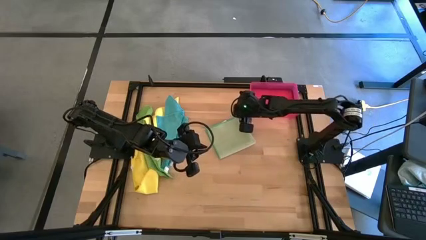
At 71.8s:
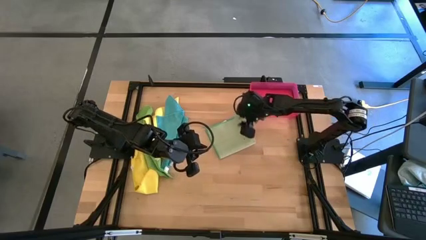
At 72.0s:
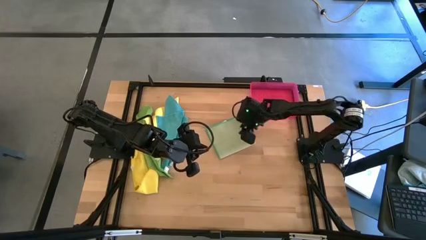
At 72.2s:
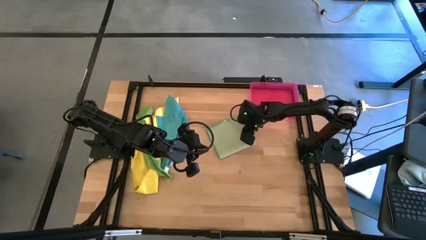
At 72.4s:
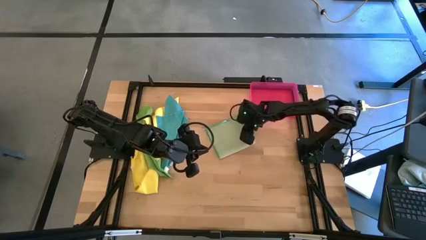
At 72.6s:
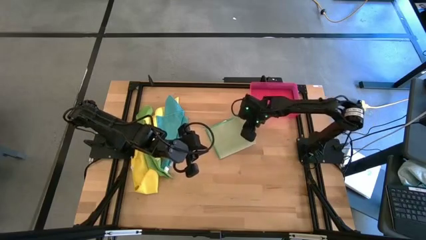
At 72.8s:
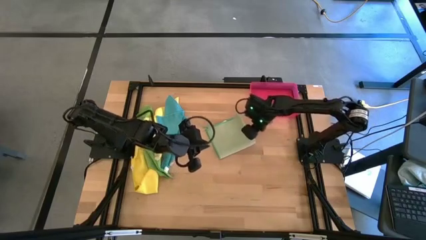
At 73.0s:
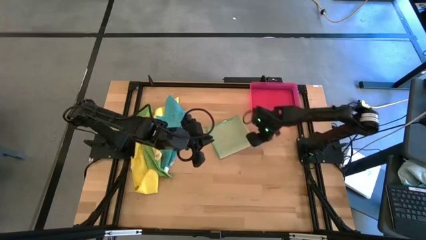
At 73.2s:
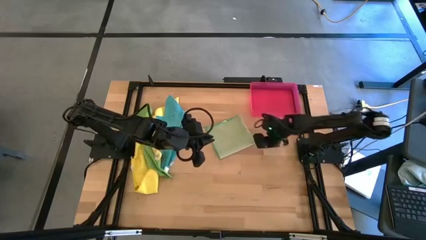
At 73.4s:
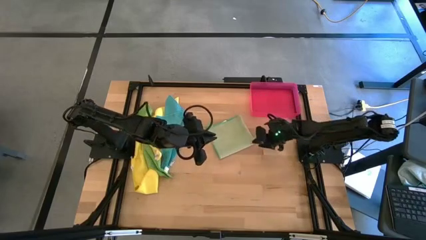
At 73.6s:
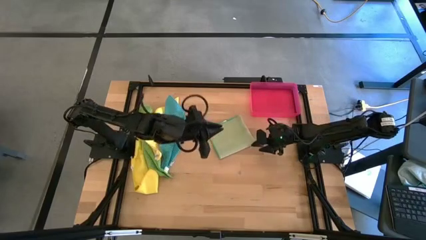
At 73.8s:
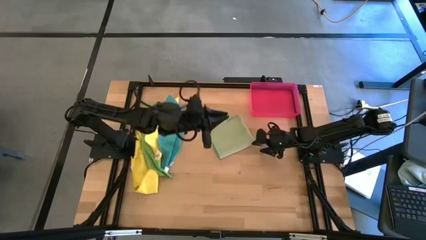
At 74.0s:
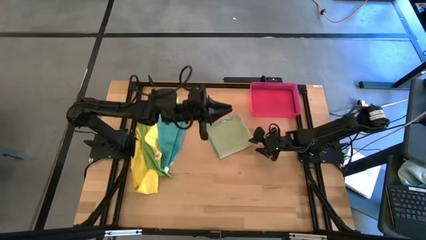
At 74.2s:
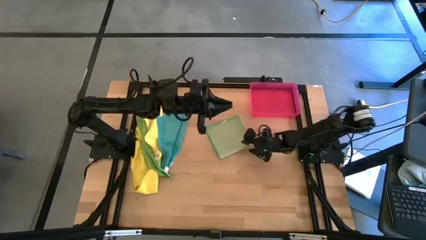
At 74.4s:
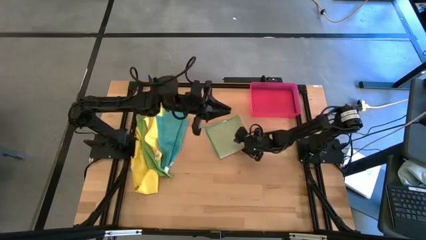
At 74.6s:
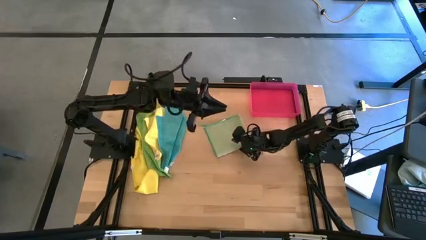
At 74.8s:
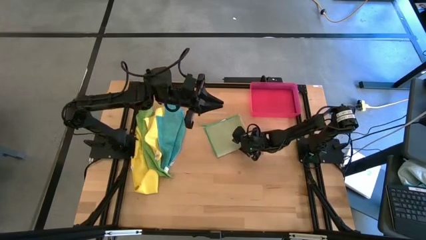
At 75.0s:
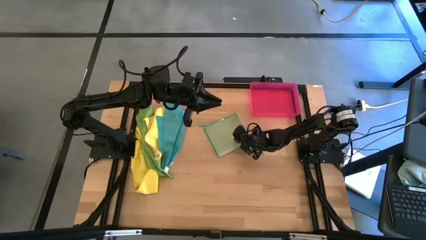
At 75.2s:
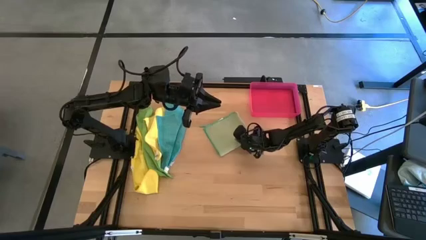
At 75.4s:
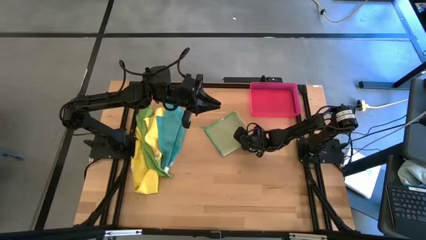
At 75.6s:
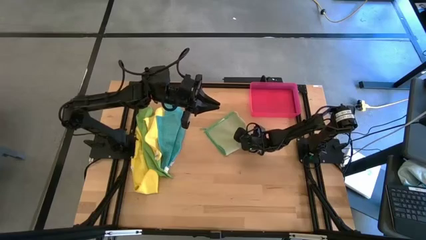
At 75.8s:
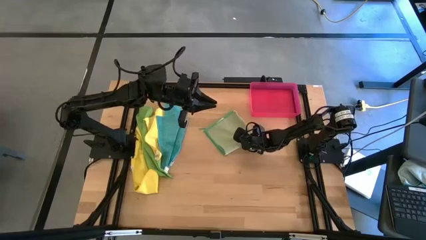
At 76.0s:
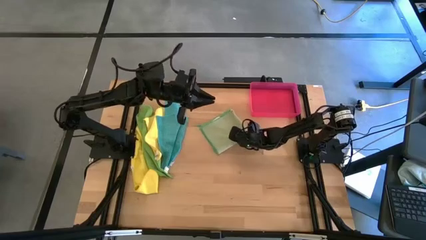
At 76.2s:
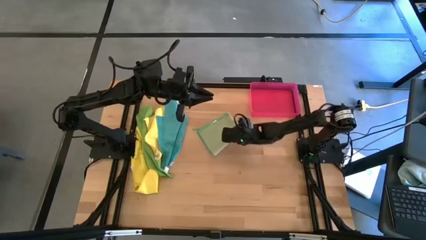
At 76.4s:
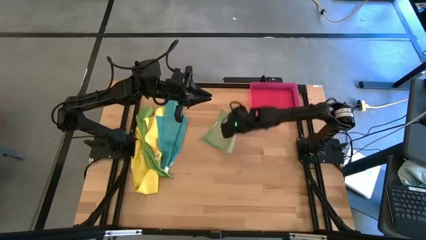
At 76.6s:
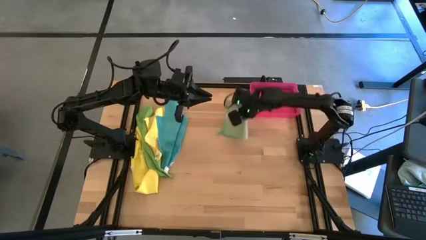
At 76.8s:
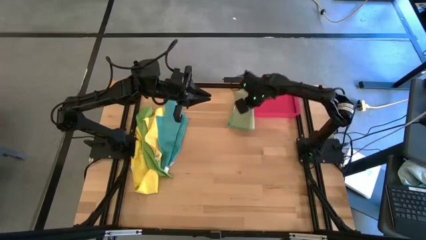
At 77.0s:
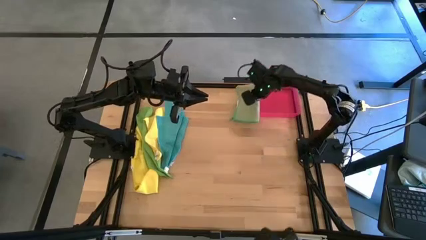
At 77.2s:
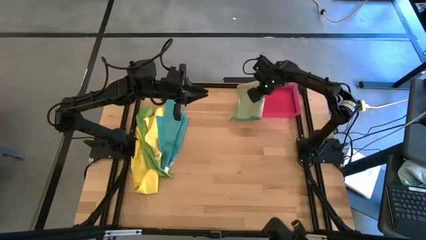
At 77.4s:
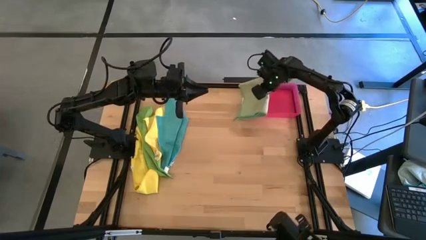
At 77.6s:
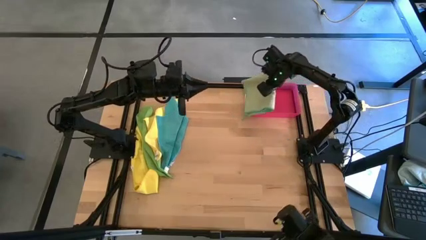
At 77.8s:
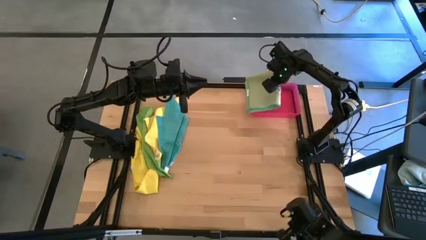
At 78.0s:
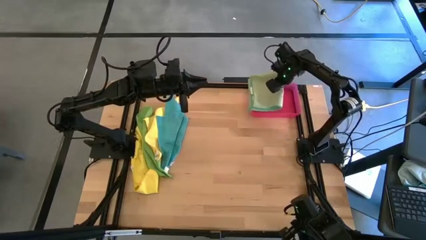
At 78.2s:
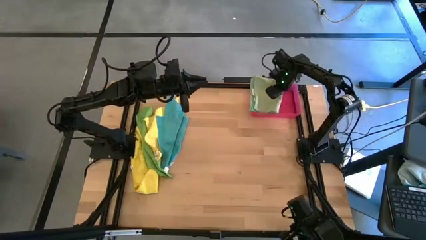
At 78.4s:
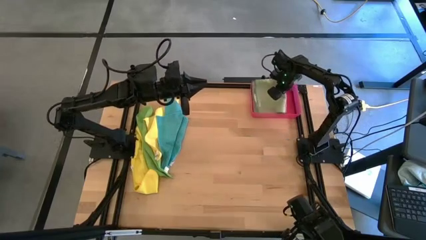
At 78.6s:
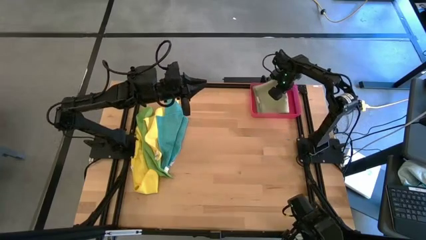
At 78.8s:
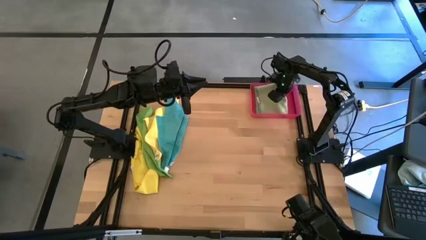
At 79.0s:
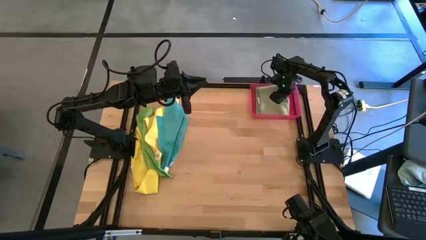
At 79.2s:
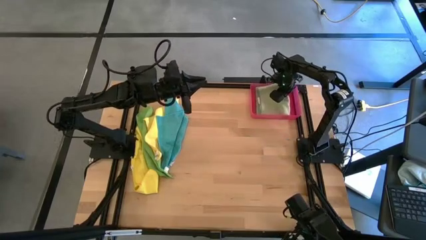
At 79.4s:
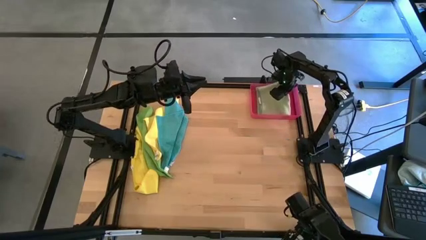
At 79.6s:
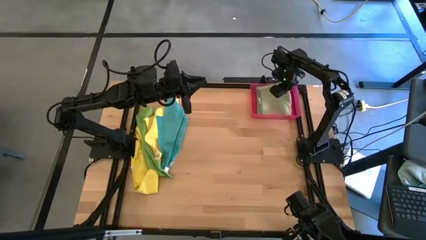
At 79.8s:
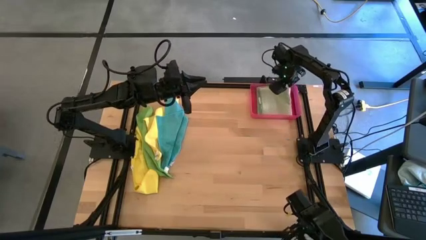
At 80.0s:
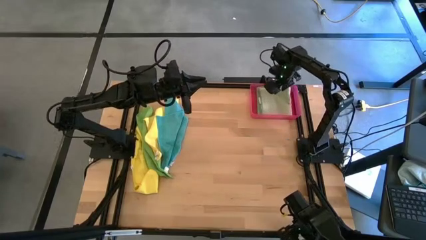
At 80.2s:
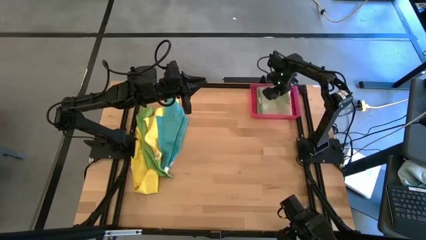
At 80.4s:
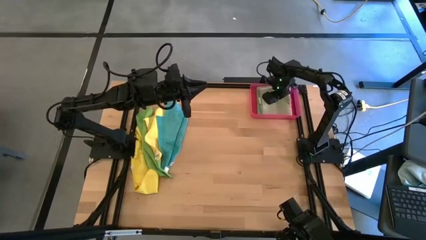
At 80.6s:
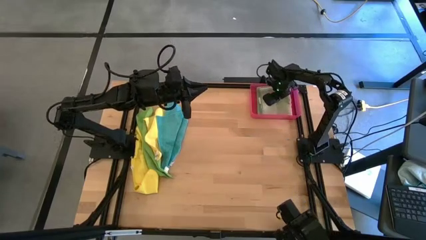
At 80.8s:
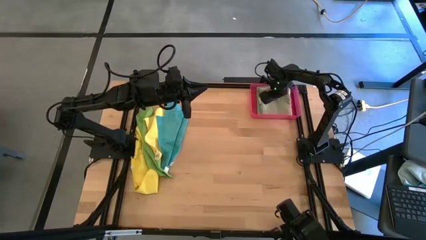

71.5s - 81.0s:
Task: Fold microfiber towels
Put the light green towel into the red bin

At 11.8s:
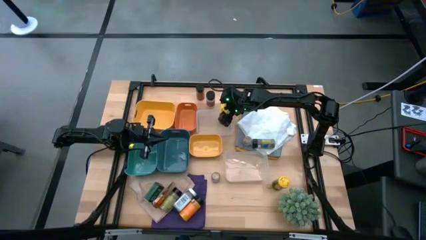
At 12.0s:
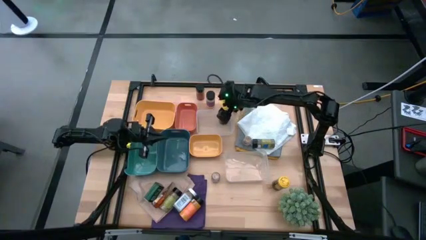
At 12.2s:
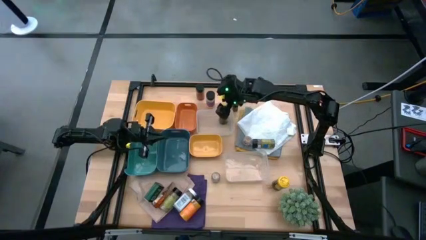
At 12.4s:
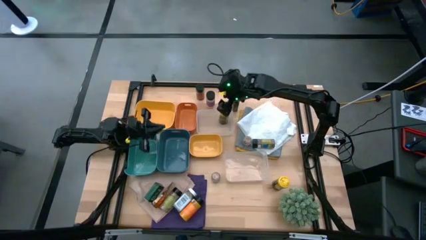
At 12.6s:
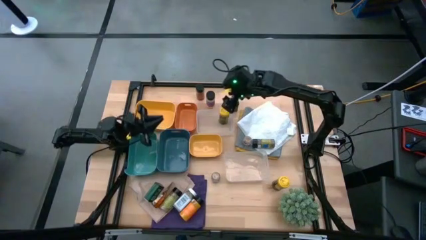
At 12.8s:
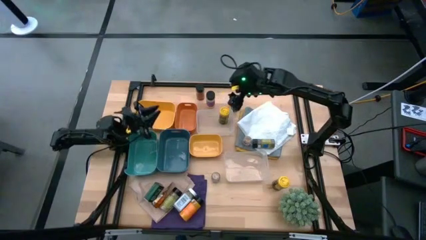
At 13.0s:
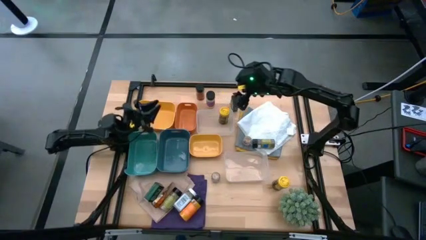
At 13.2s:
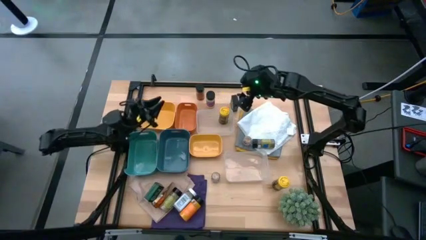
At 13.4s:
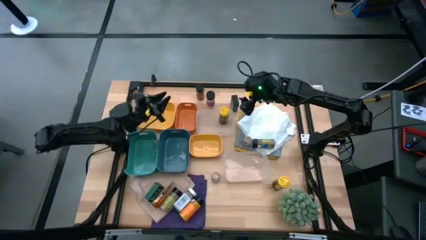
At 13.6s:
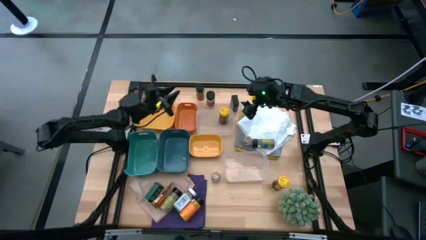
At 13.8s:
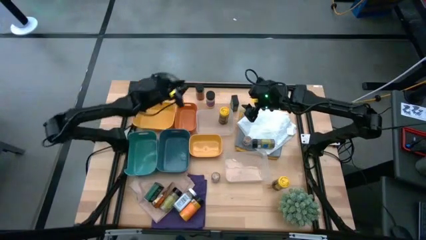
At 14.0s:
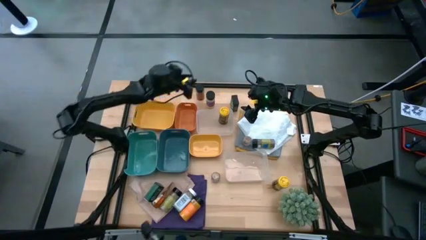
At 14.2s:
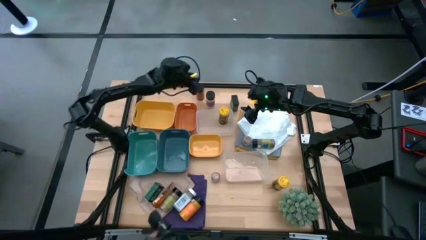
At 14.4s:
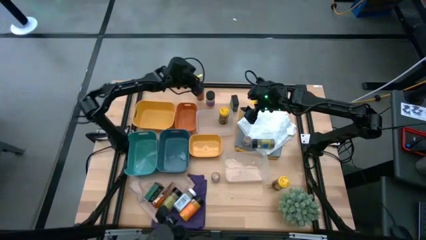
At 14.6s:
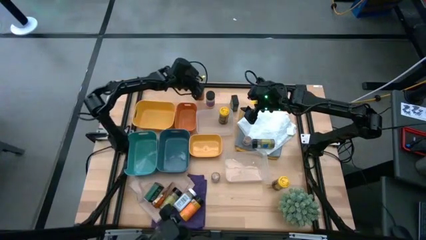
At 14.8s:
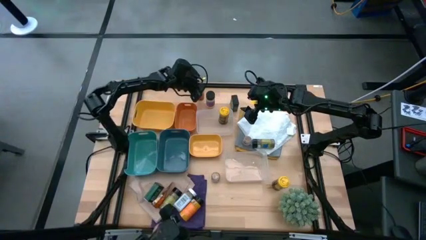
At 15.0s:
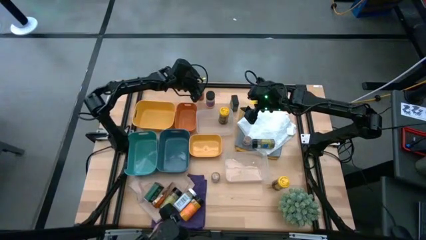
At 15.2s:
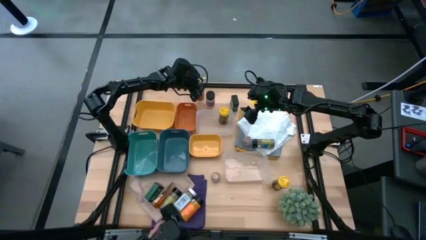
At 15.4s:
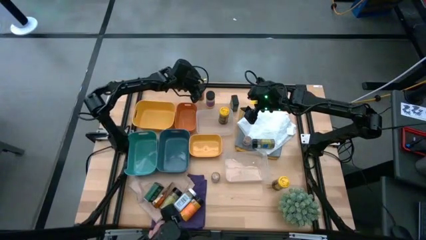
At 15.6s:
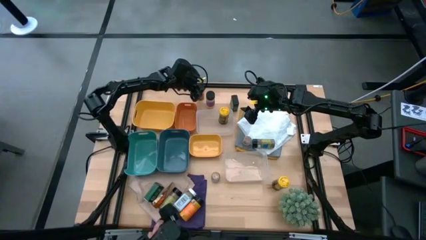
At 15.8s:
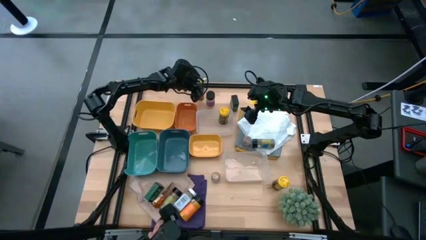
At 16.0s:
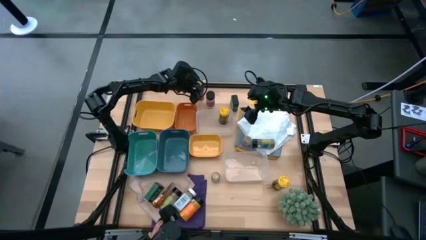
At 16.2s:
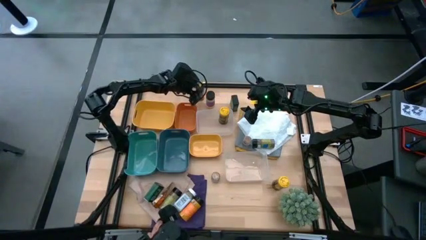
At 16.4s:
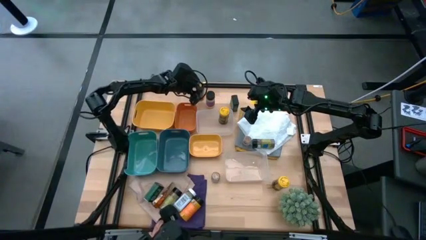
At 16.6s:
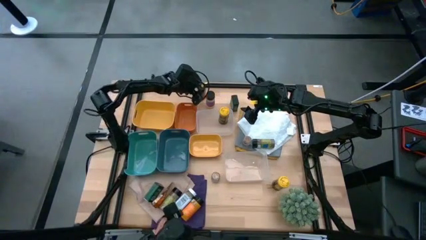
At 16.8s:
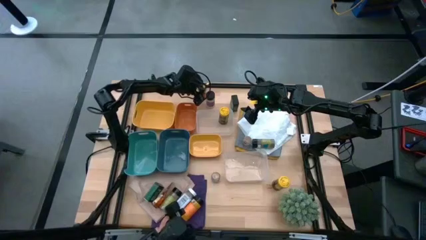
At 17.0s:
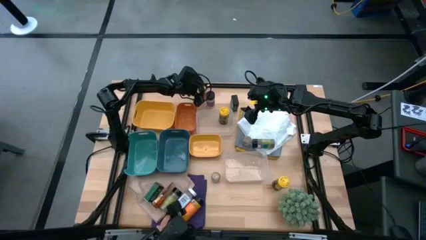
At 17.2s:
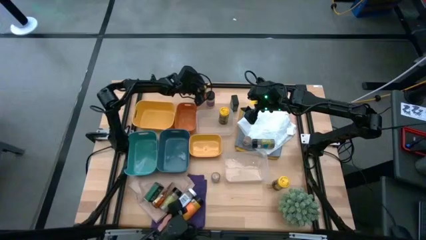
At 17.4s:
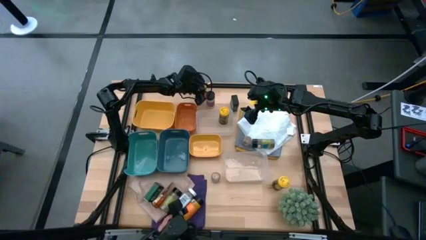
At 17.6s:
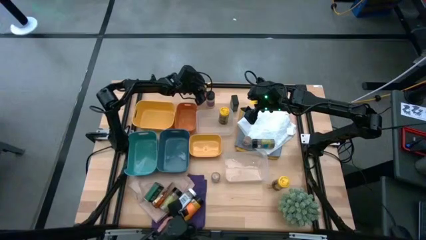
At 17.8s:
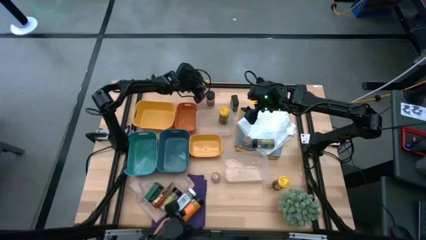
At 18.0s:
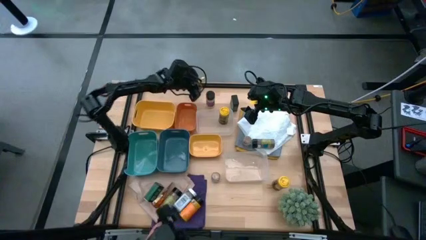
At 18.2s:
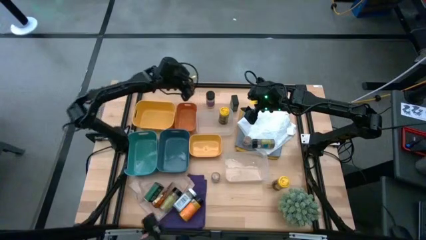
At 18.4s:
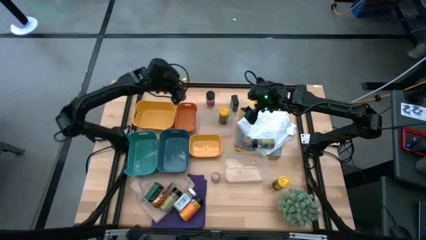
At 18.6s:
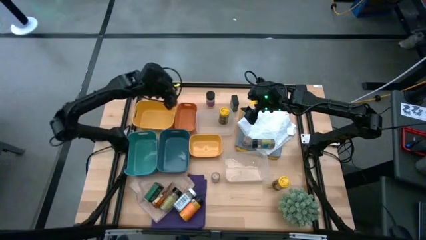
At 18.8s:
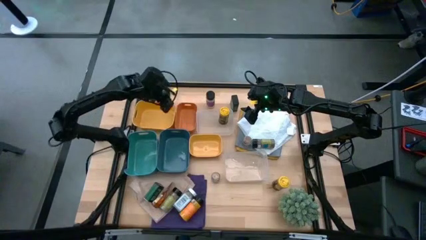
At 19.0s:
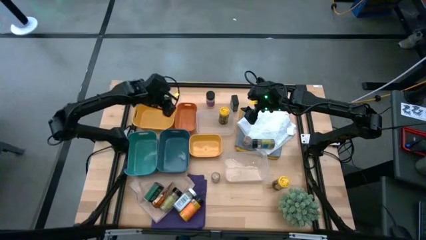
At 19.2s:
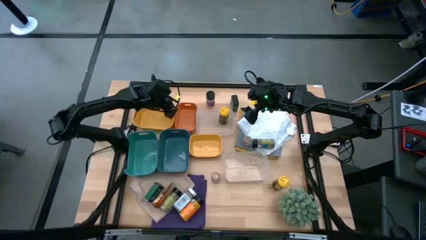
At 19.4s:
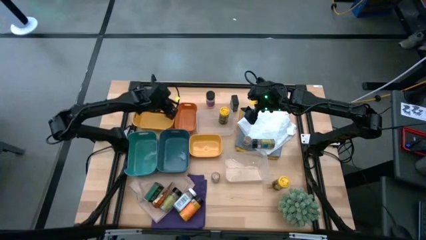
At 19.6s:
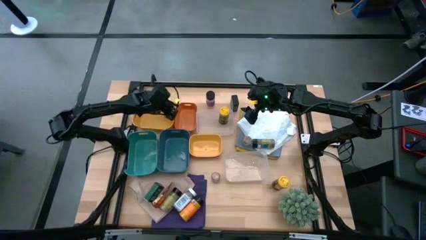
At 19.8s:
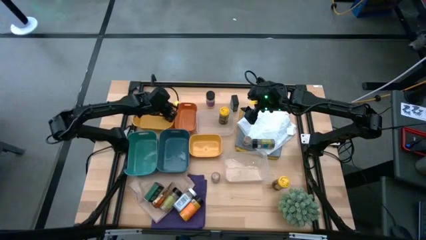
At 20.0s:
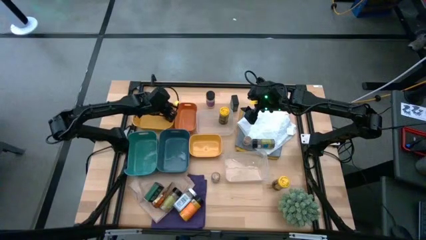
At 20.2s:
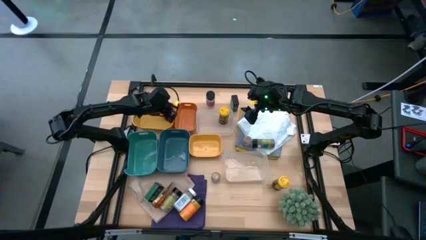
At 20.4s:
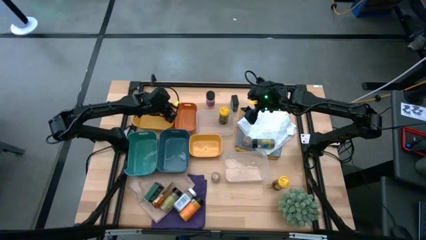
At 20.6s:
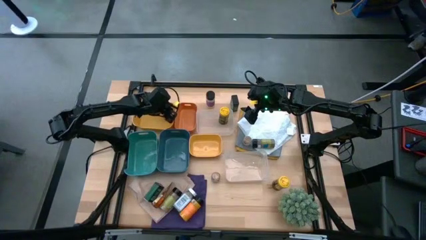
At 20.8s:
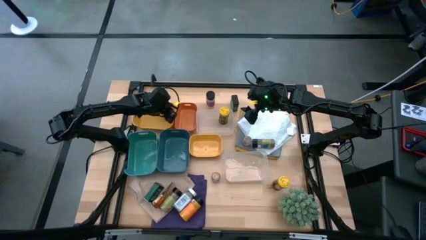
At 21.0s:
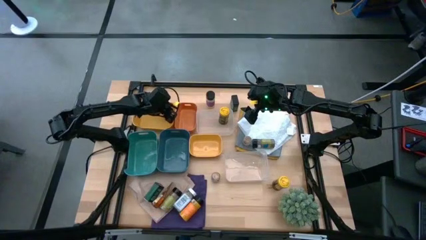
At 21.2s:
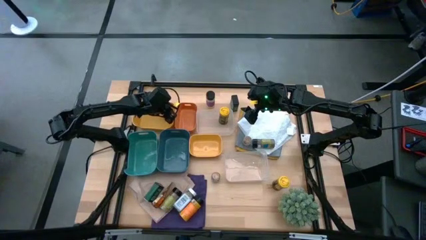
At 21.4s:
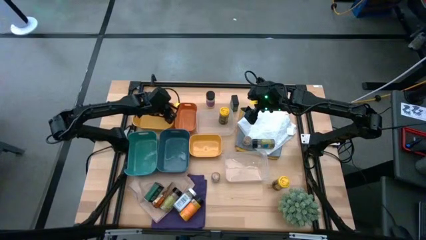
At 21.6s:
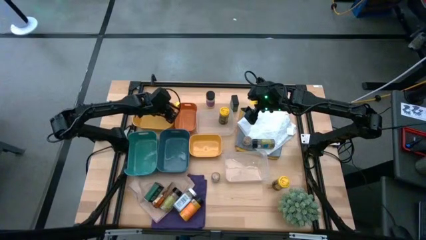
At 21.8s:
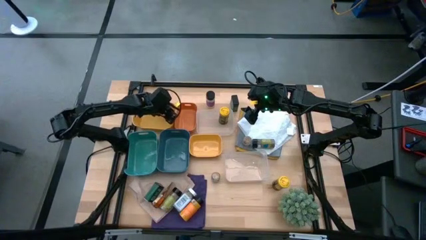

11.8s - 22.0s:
Task: Sort spices by type
Put the top orange spice bottle into the top yellow bin
